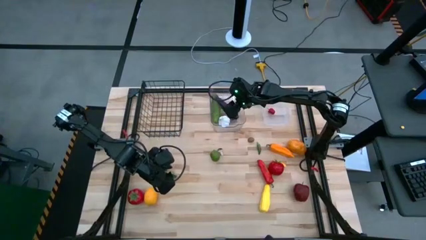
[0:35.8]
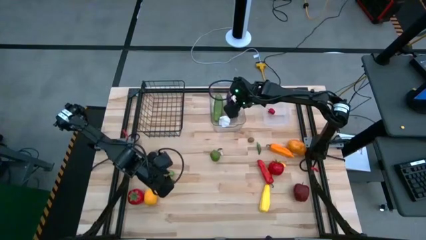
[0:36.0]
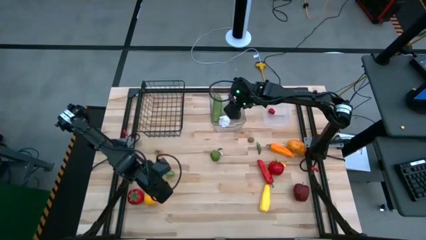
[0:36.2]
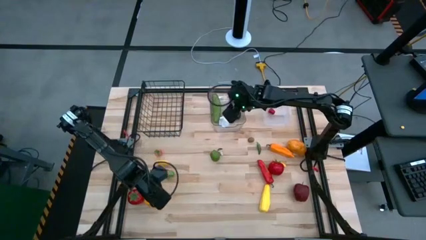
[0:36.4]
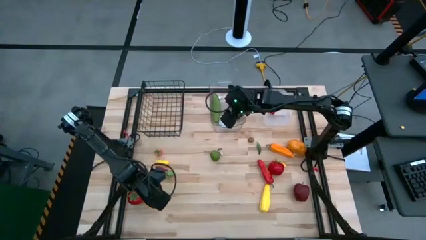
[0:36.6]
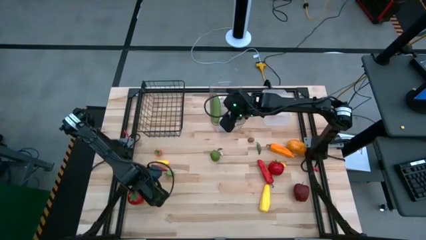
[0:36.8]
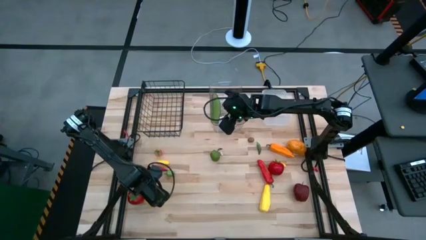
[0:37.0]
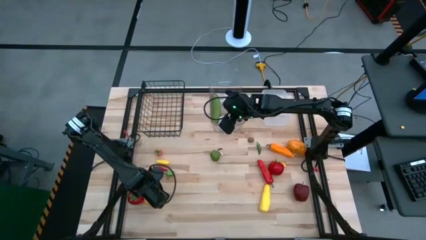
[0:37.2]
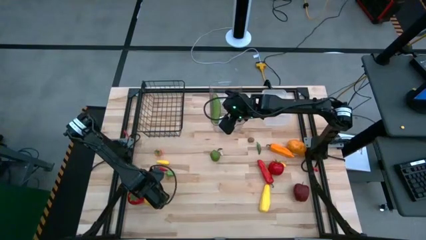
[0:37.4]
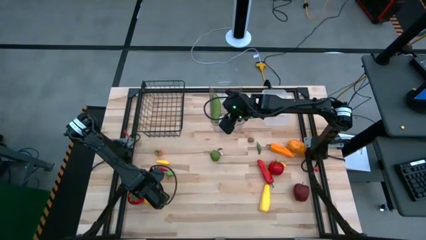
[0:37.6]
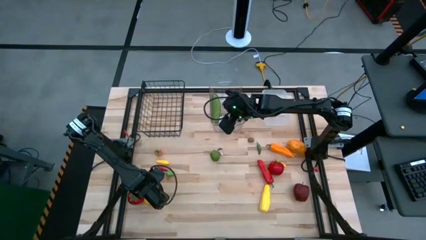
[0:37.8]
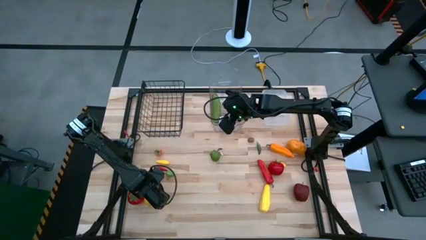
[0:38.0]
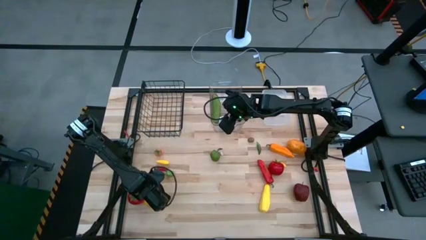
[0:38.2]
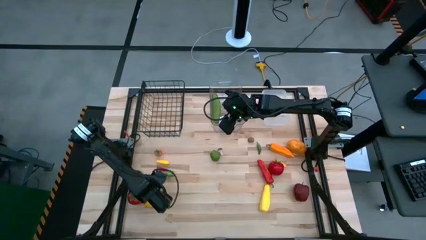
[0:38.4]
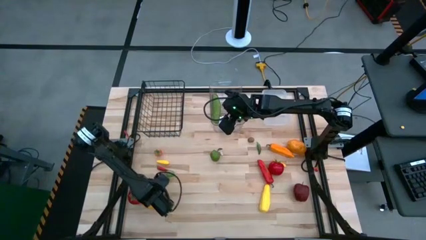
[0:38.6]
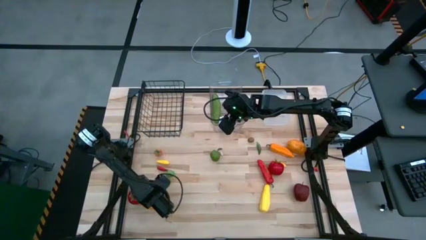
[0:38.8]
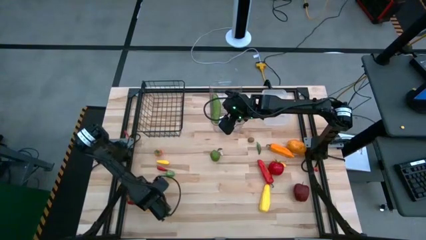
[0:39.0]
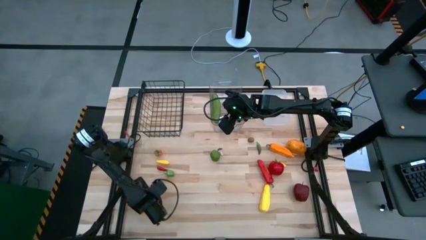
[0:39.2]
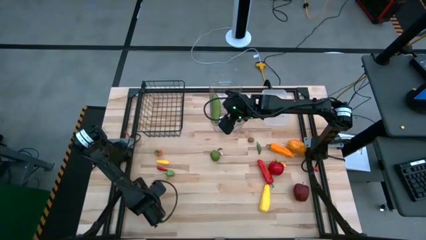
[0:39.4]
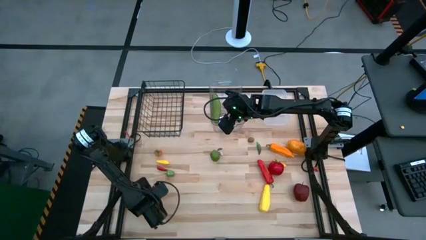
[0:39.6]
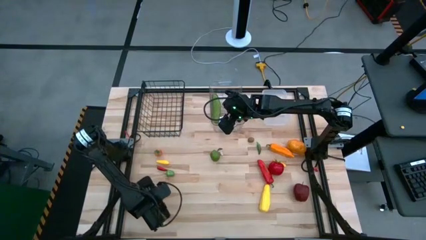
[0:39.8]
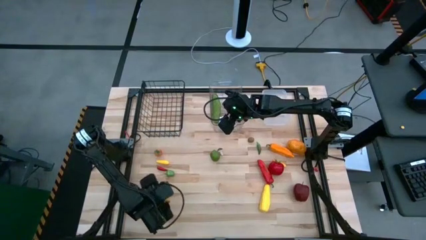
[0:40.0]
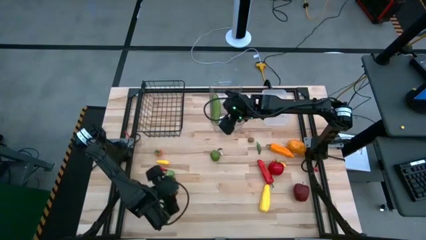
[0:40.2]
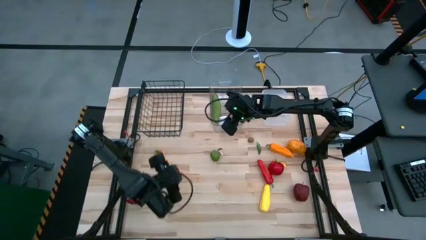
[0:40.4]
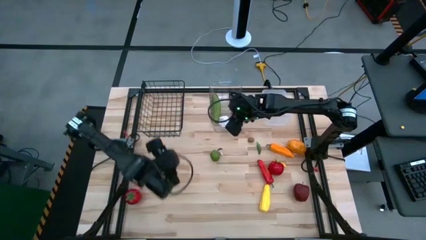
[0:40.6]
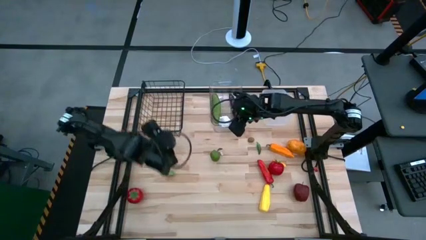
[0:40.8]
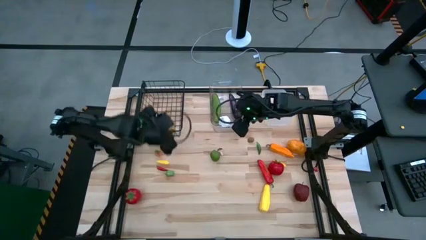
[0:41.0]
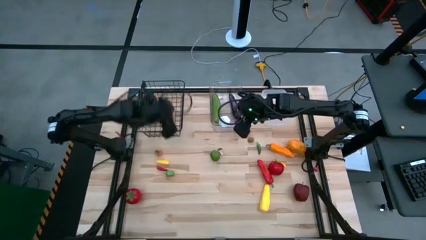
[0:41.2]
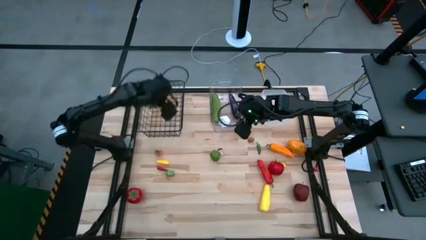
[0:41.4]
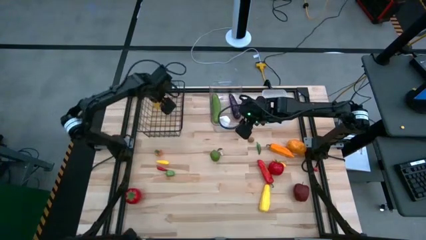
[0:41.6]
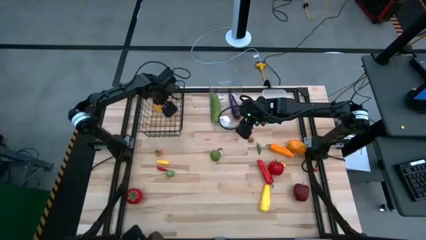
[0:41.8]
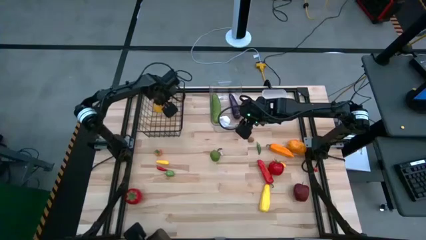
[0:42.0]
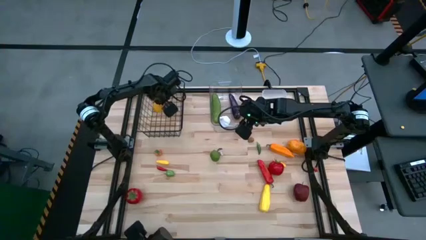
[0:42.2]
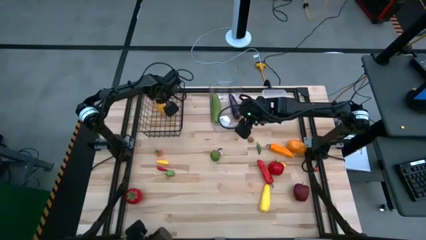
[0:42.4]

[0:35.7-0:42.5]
Task: Sort produce into baskets
Put the yellow lemon into the black wire basket

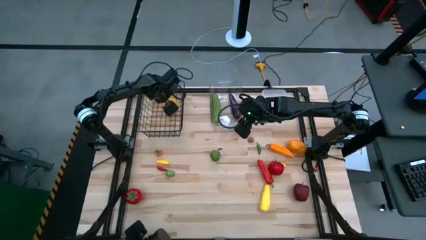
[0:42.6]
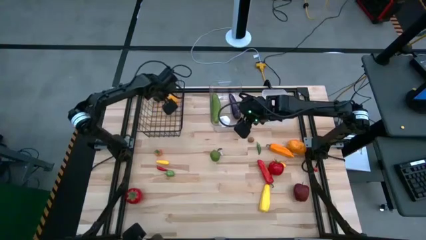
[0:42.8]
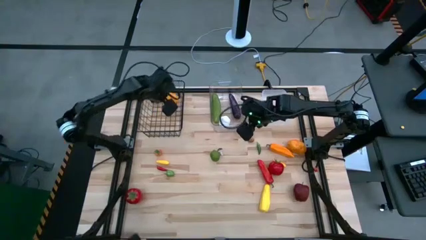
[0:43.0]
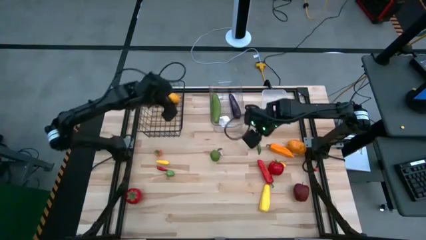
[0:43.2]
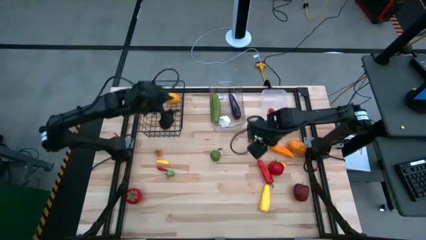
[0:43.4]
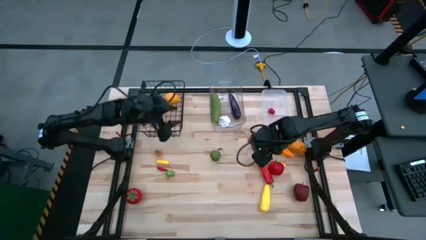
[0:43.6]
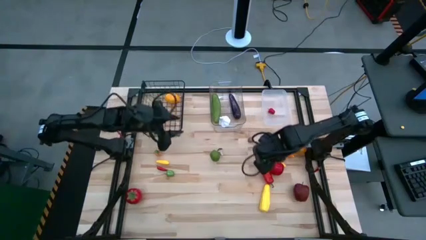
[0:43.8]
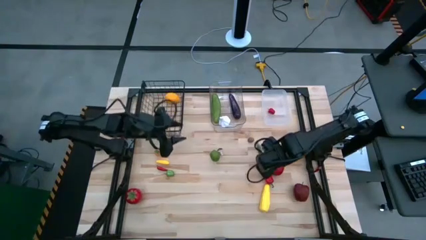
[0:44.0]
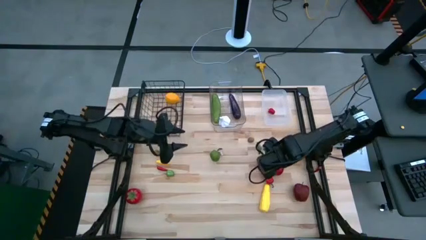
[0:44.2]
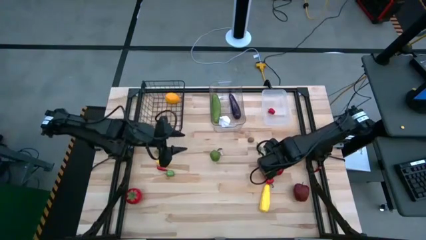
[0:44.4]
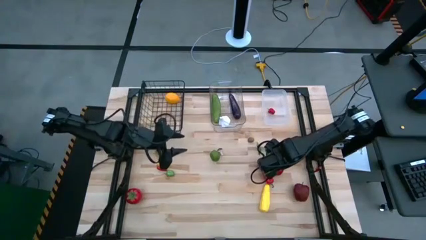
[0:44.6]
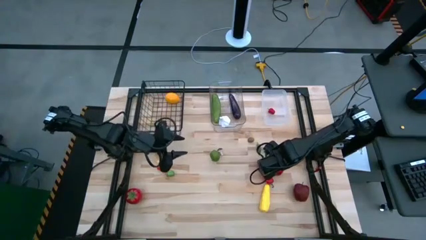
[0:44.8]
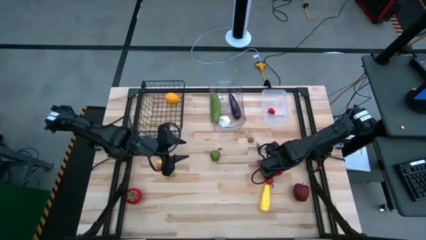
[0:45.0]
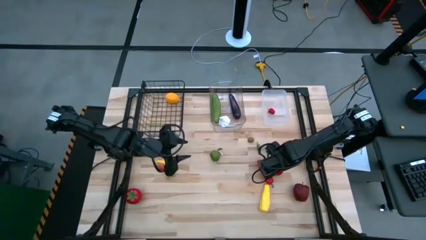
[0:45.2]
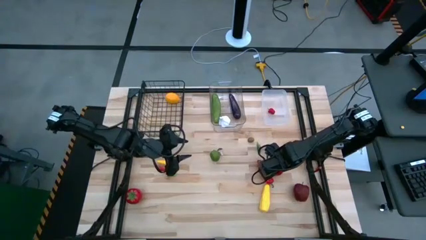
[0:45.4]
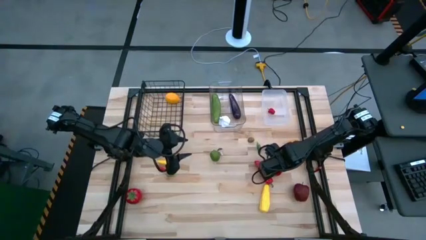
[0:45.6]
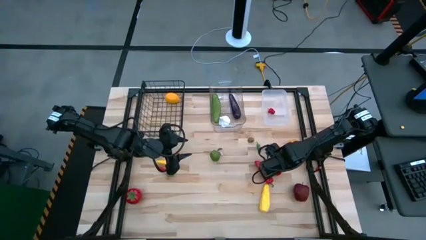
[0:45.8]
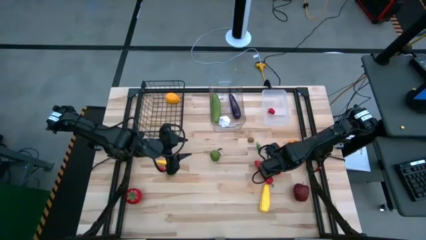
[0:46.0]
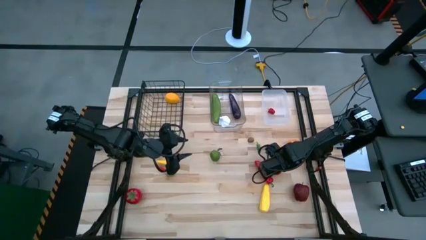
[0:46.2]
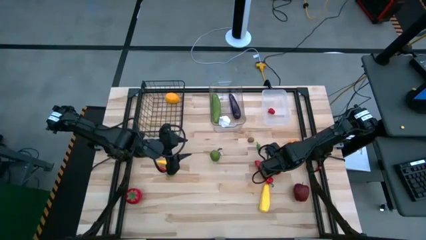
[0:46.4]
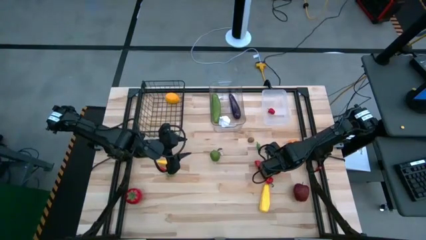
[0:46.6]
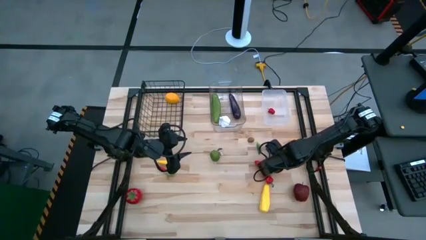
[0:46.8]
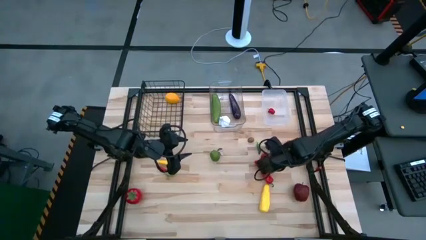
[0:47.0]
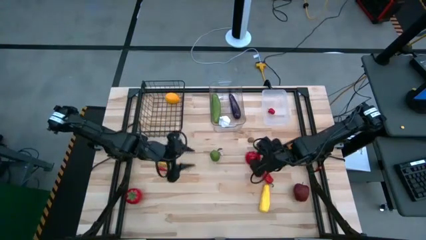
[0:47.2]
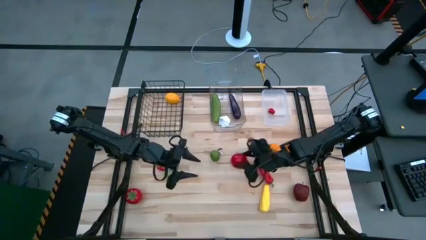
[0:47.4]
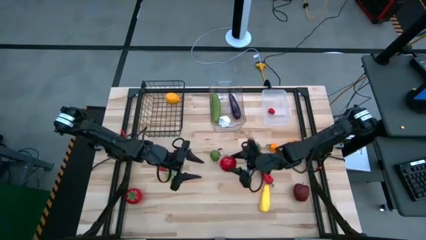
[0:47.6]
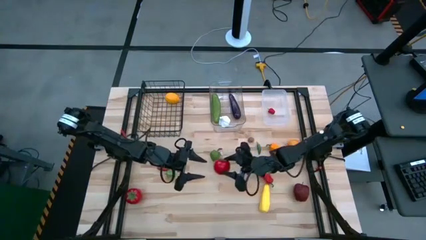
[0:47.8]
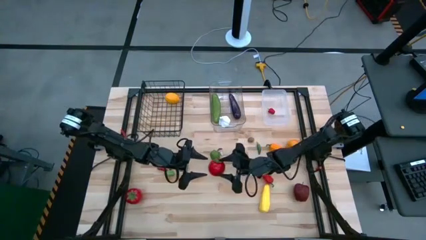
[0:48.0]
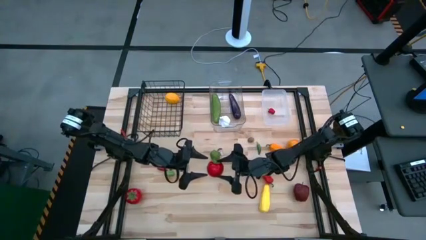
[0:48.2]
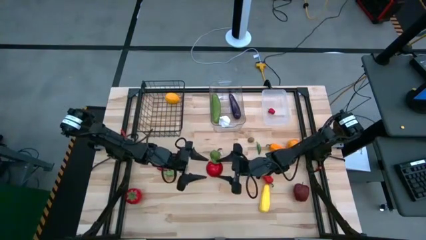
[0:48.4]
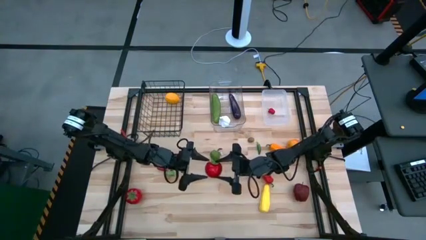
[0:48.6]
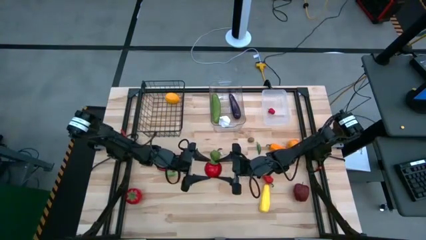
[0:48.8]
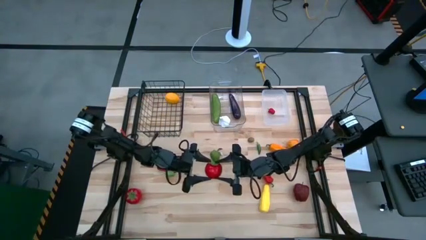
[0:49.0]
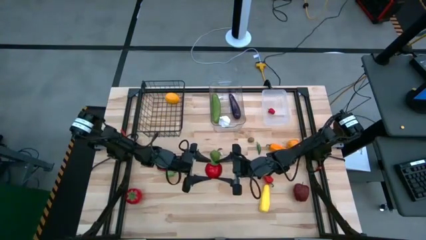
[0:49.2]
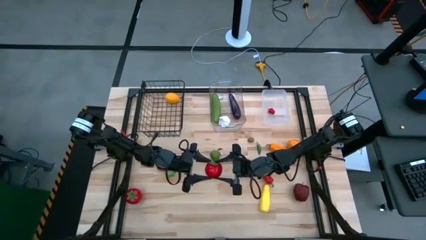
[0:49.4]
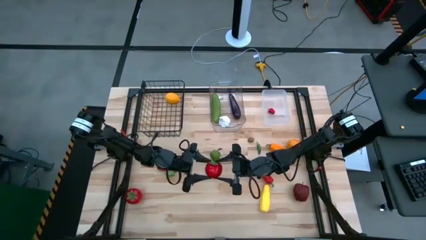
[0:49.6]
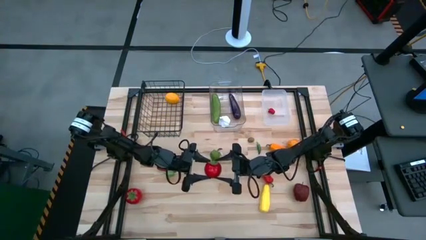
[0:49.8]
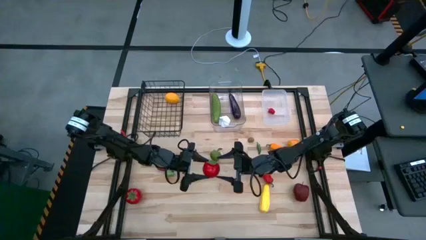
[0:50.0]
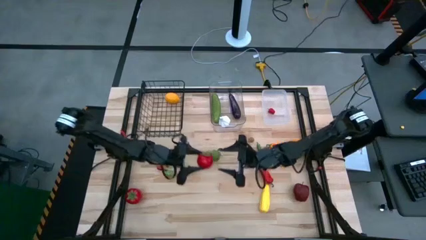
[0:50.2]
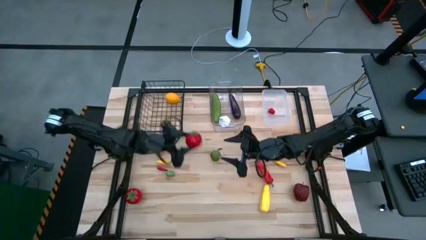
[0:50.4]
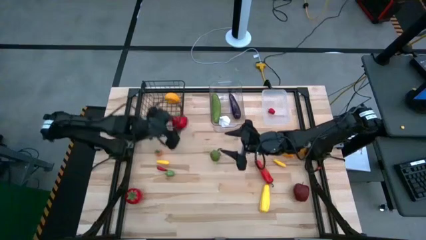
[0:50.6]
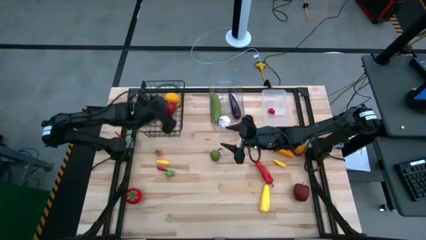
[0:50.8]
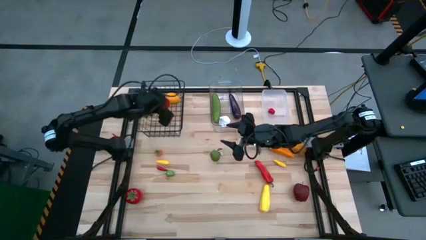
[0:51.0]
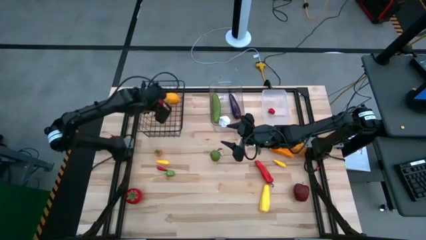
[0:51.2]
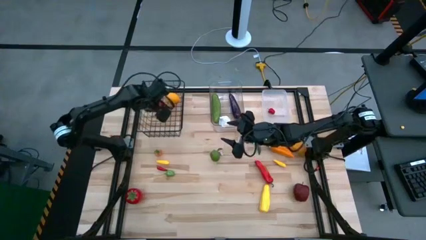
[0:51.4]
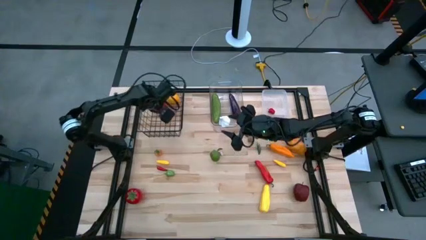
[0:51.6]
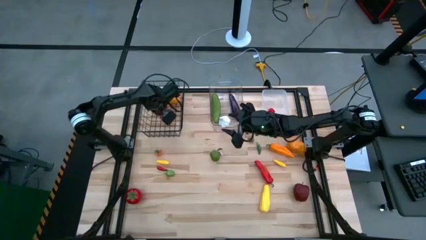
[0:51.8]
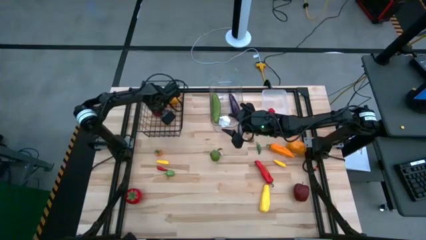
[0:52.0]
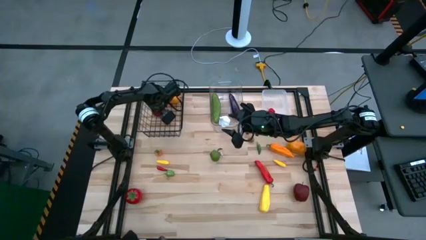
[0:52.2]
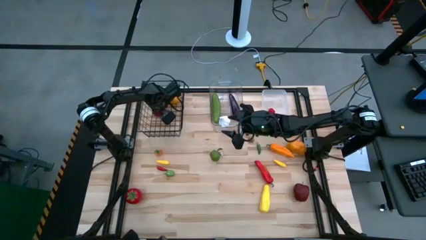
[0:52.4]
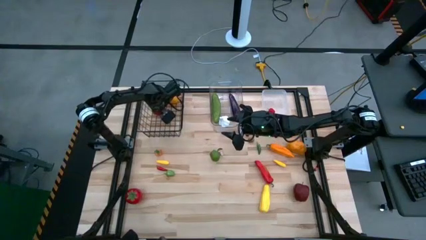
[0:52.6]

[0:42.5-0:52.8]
Put the red tomato into the black wire basket
